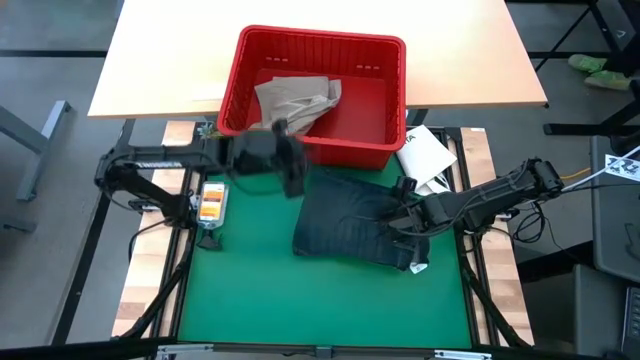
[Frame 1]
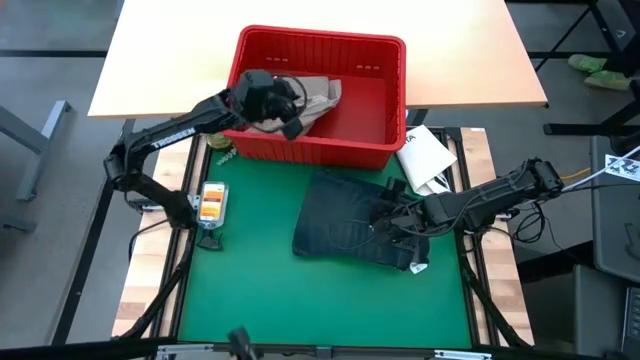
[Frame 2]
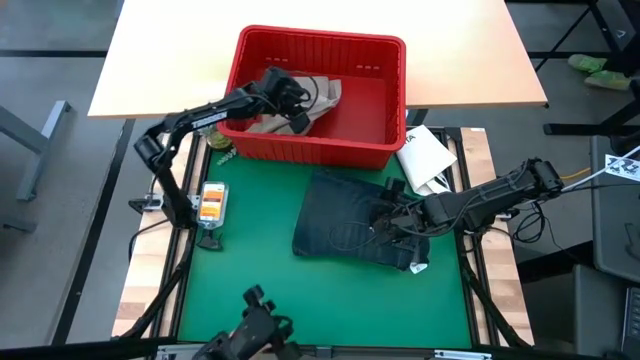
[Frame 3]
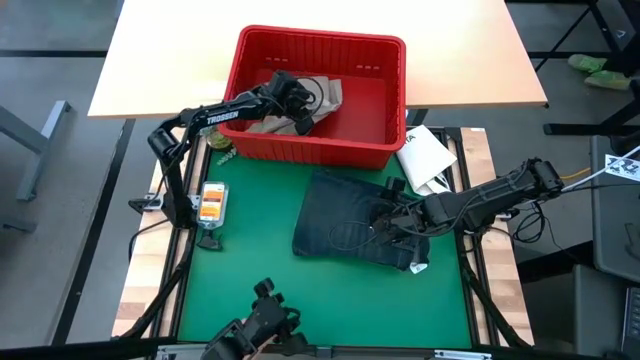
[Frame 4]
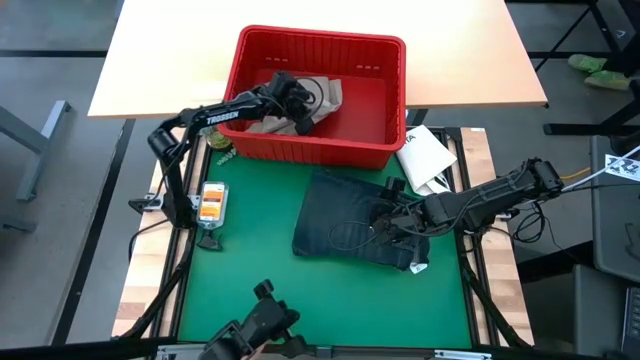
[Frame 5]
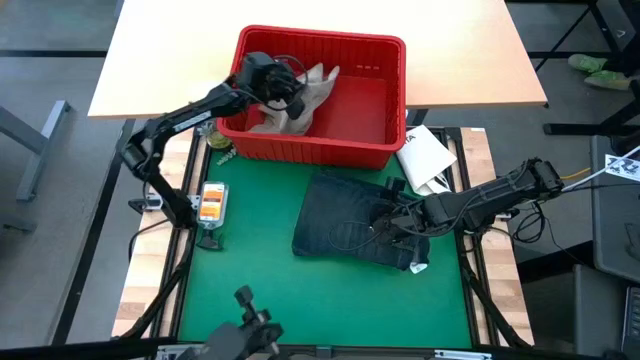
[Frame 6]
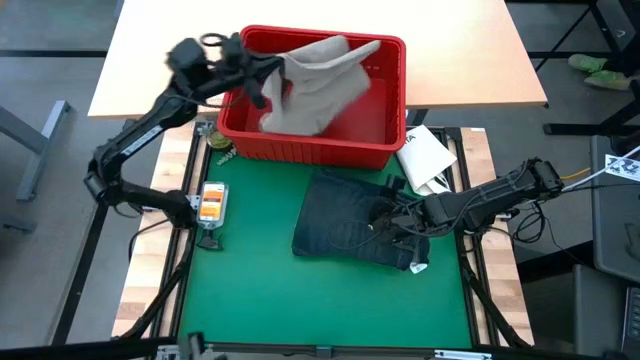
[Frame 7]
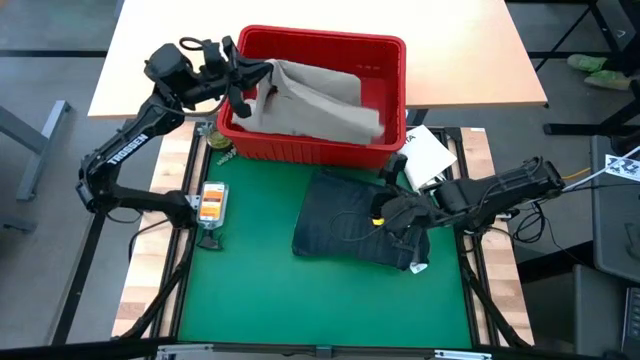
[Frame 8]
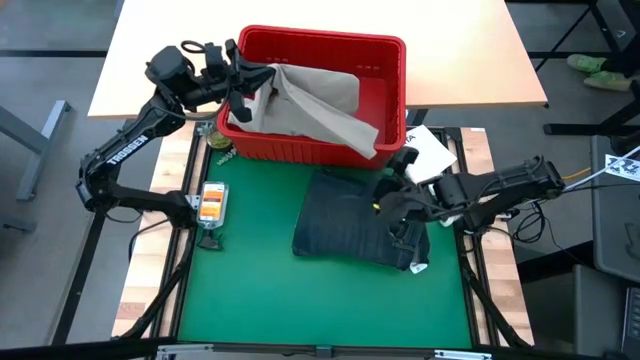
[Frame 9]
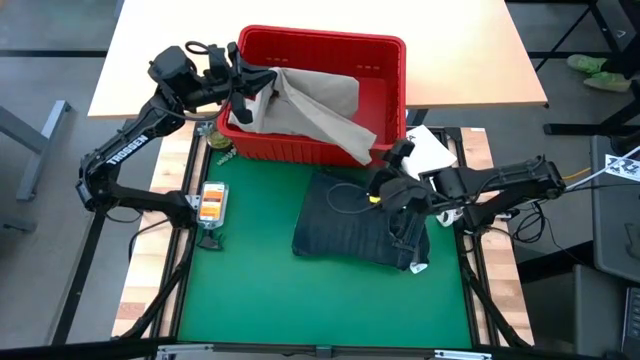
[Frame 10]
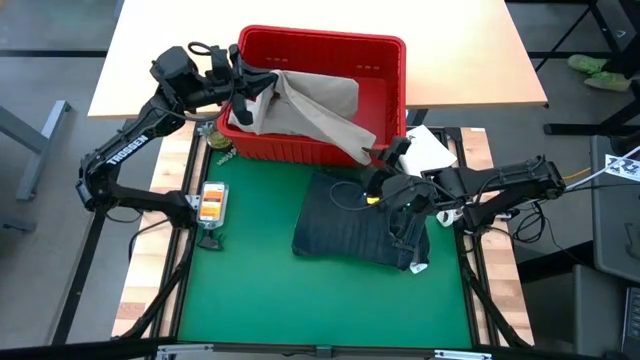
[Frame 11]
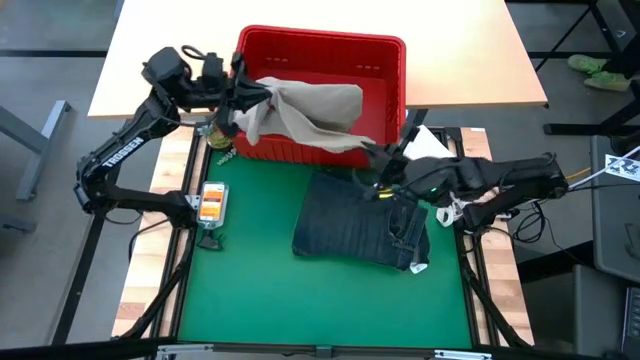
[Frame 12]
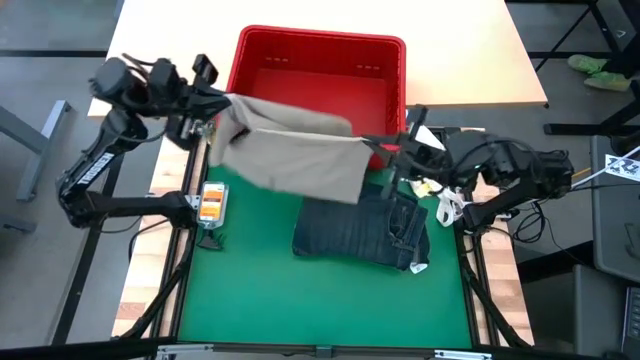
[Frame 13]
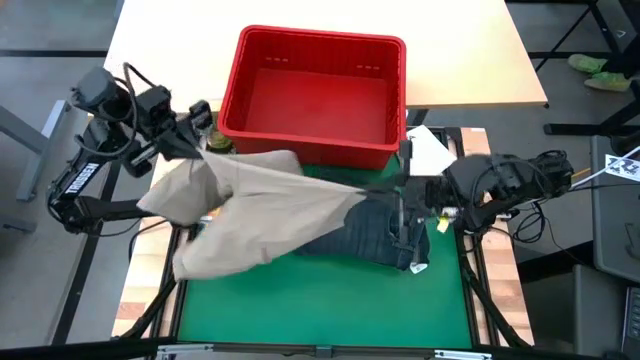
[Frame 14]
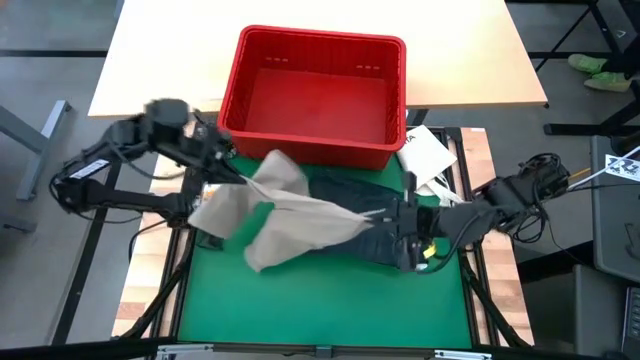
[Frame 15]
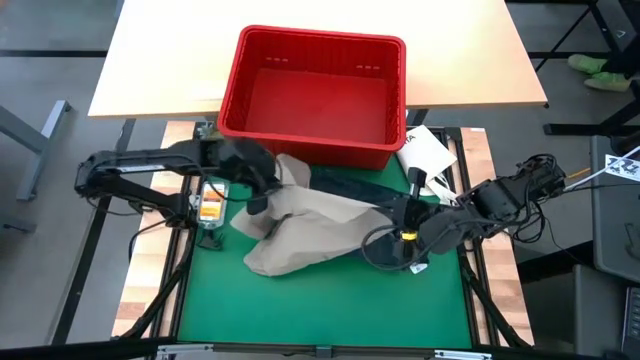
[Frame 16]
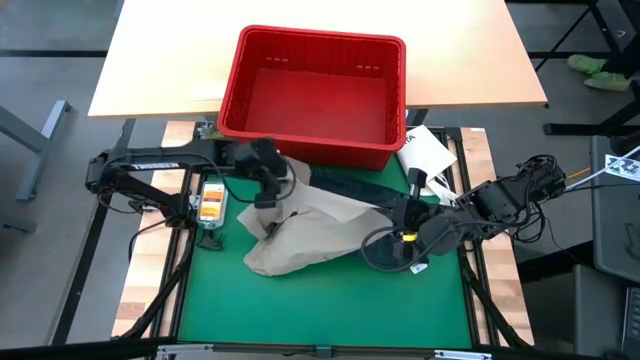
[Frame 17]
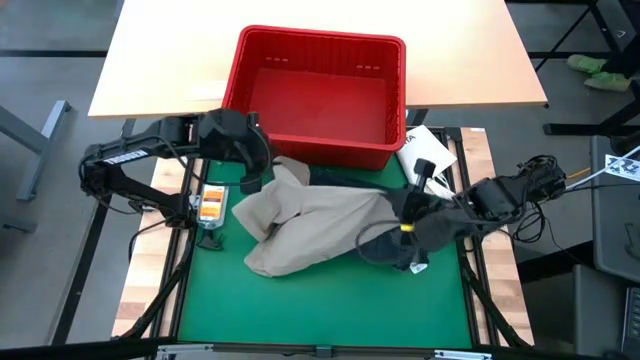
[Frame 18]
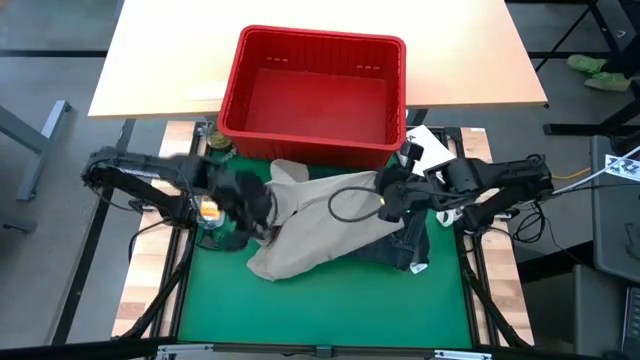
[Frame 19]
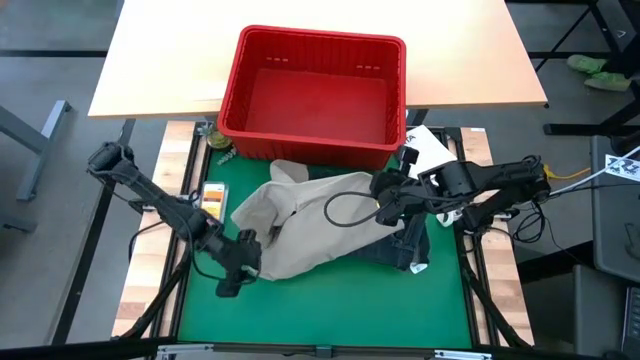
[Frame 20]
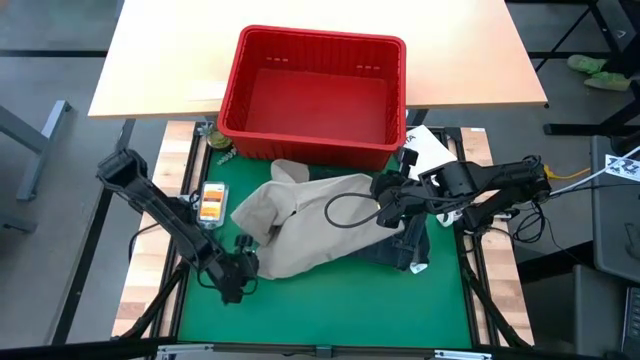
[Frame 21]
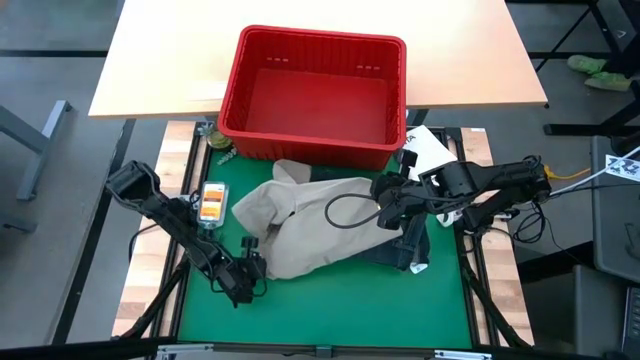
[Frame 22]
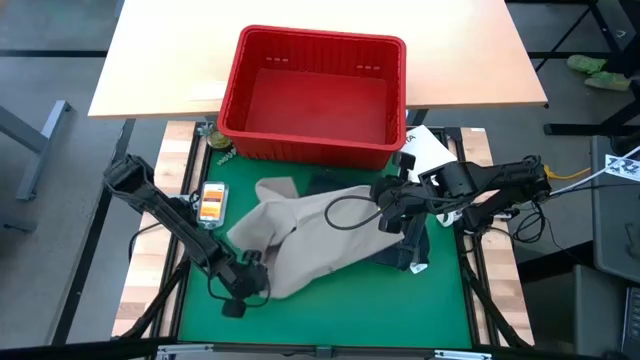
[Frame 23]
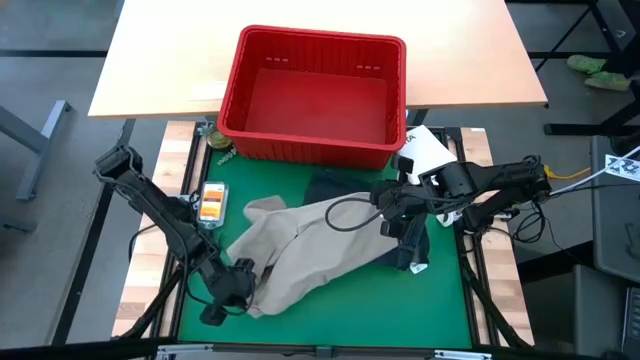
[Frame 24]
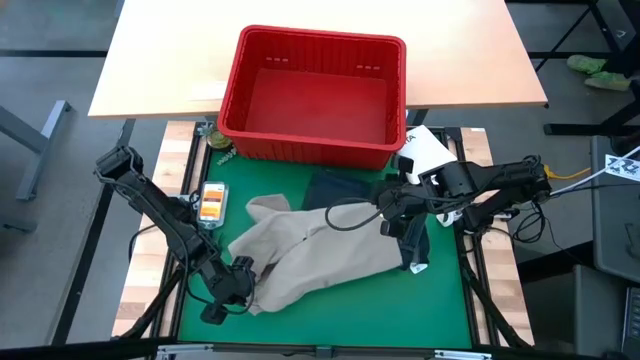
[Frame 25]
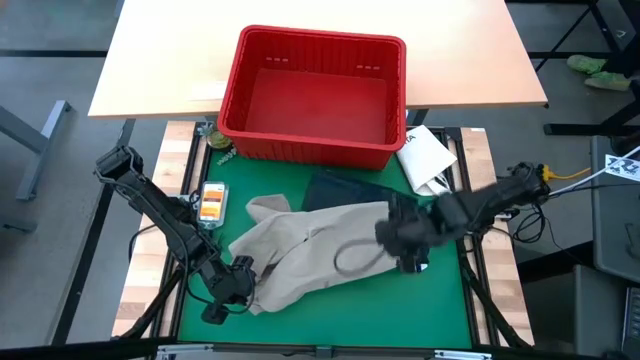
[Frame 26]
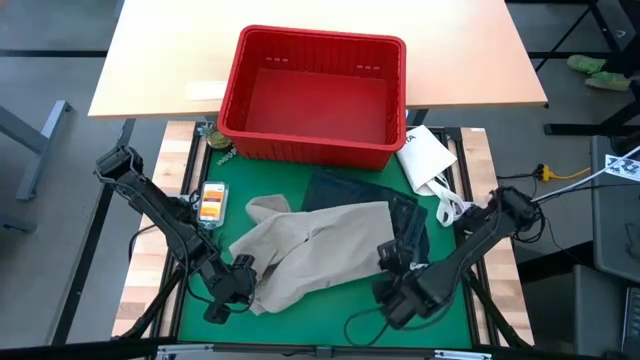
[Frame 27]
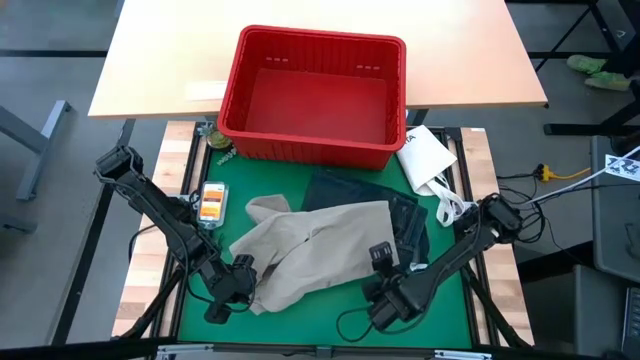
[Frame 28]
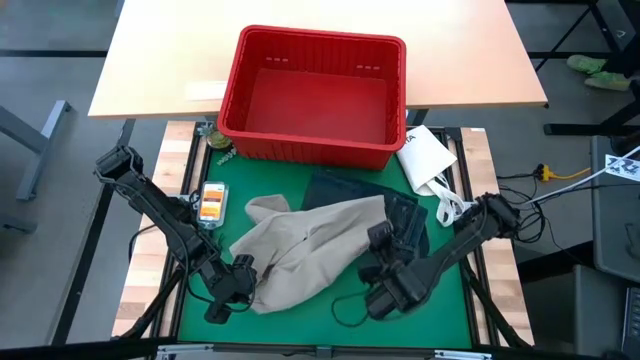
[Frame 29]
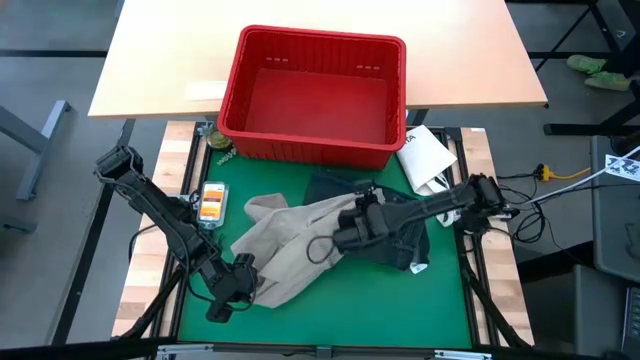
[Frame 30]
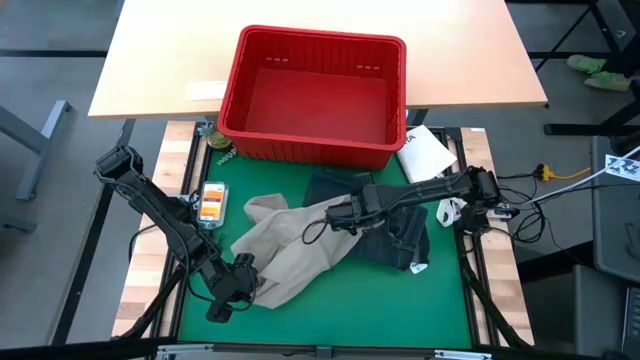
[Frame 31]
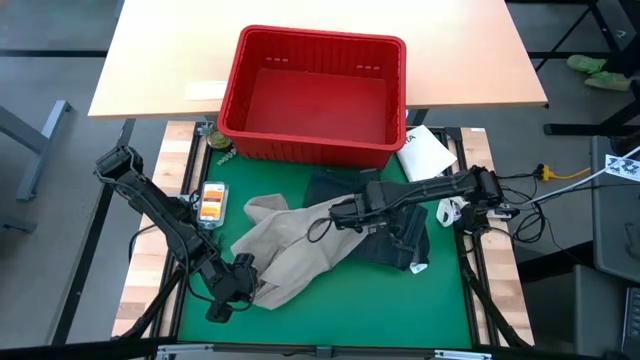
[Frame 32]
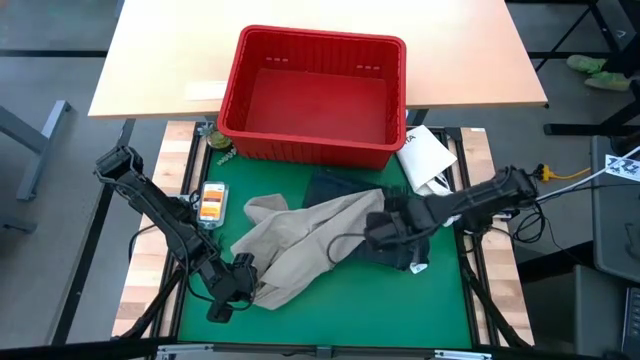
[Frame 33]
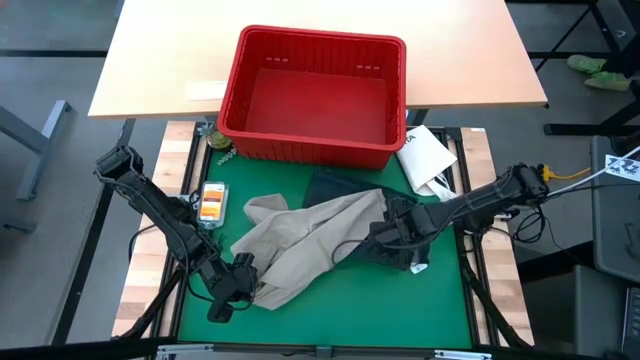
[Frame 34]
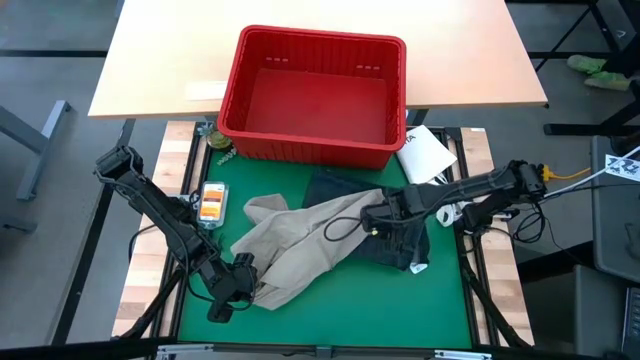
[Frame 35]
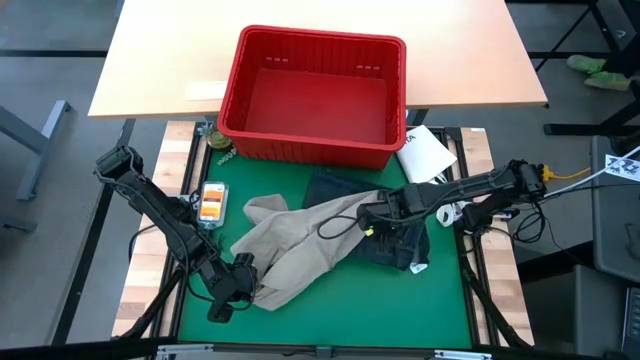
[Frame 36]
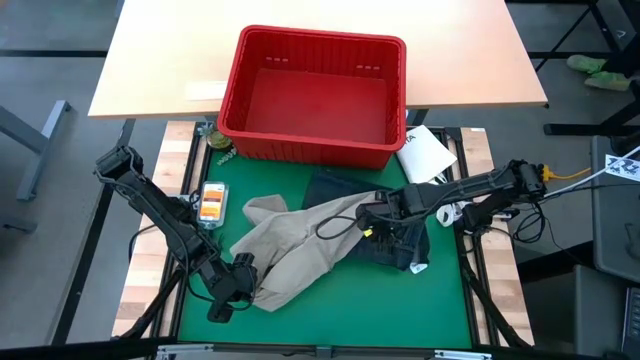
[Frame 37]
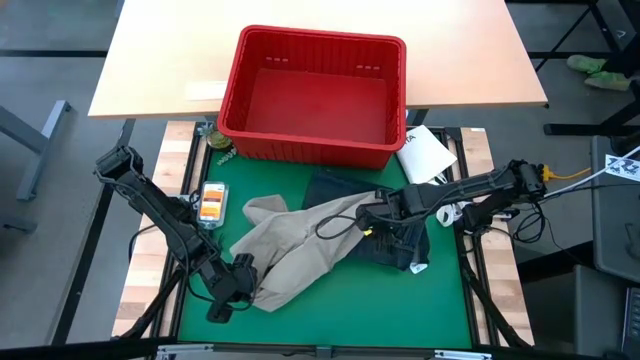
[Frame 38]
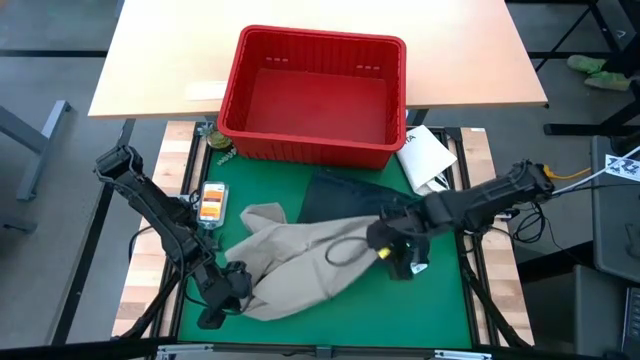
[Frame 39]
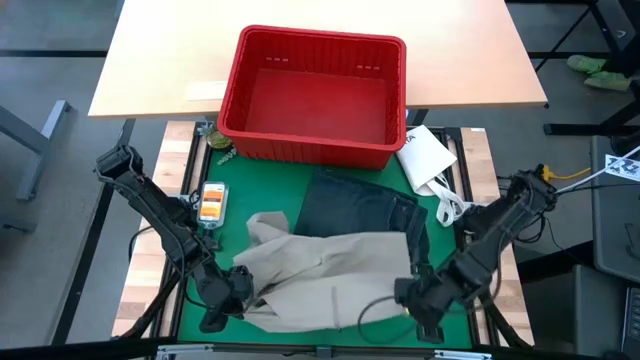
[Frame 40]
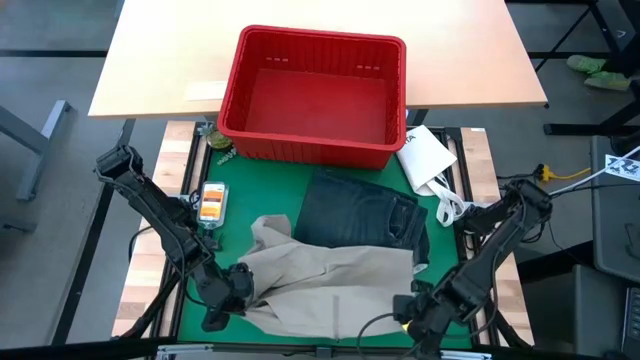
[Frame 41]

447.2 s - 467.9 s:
Task: Fold Laundry from Bin
Fold the gray shorts
